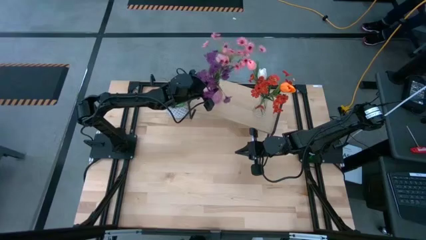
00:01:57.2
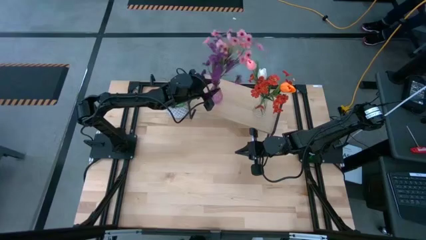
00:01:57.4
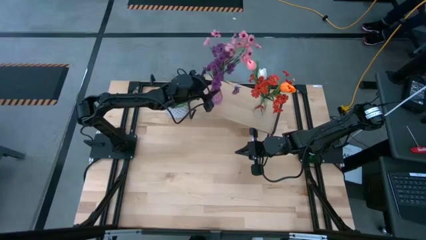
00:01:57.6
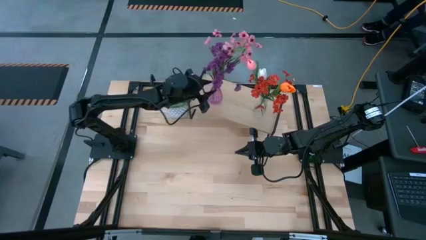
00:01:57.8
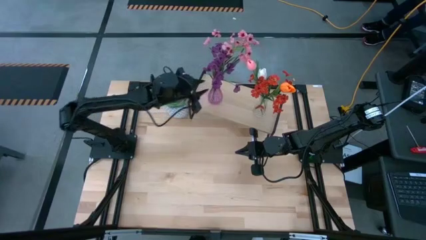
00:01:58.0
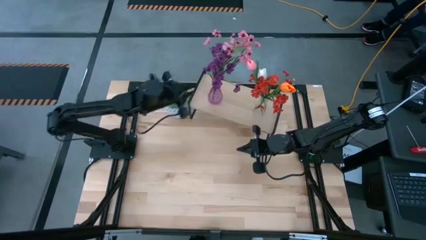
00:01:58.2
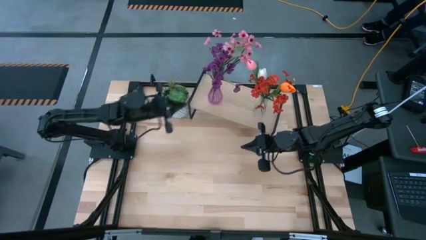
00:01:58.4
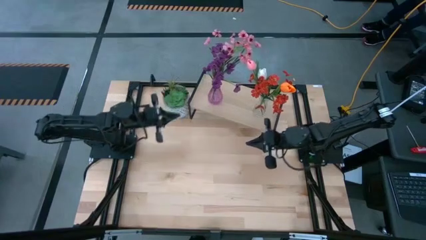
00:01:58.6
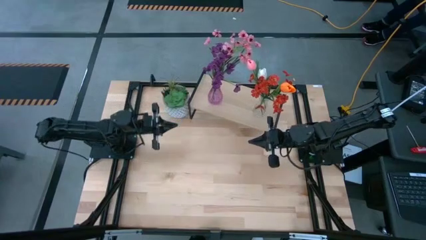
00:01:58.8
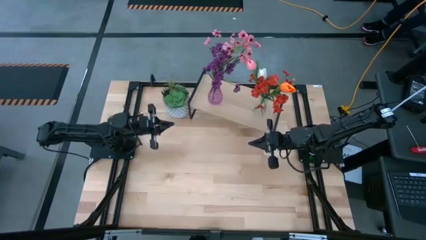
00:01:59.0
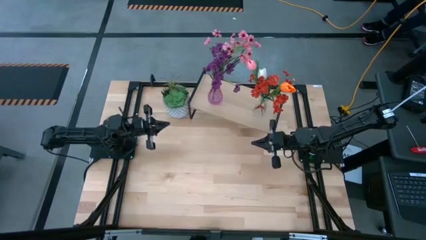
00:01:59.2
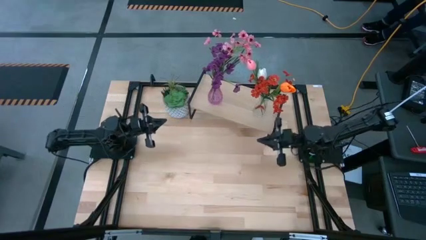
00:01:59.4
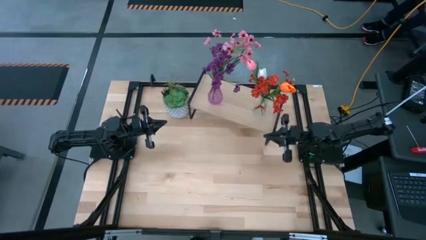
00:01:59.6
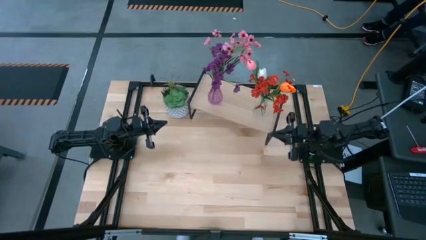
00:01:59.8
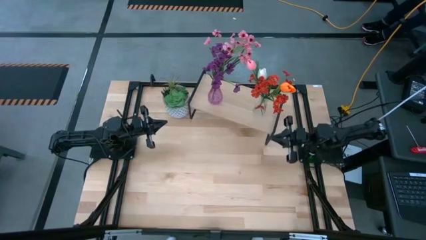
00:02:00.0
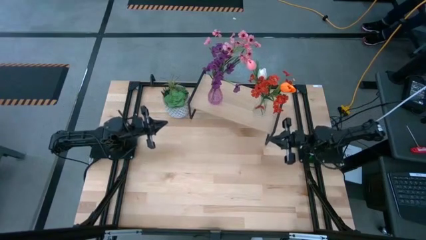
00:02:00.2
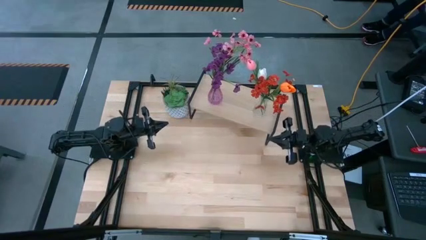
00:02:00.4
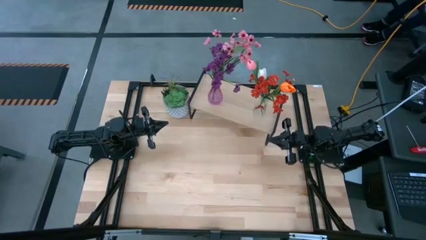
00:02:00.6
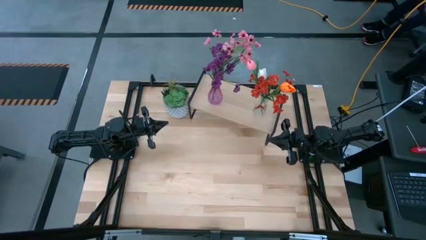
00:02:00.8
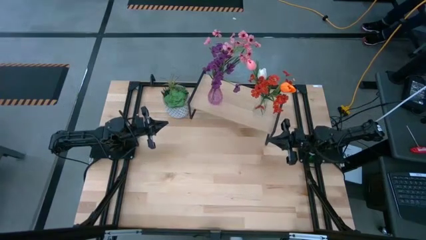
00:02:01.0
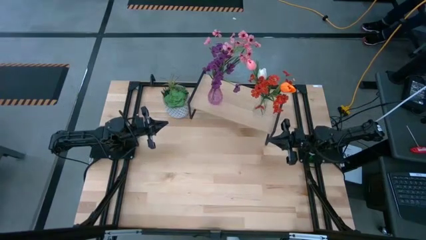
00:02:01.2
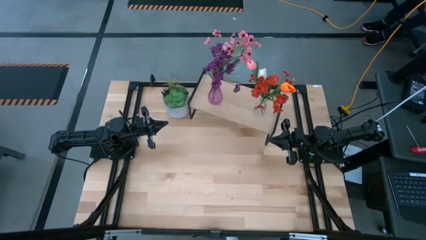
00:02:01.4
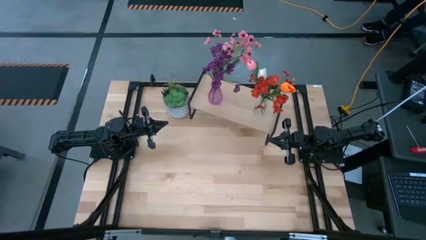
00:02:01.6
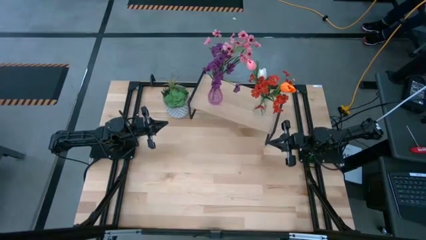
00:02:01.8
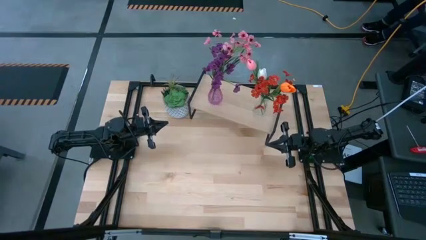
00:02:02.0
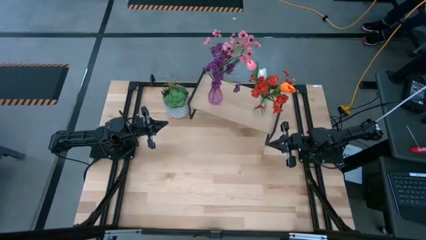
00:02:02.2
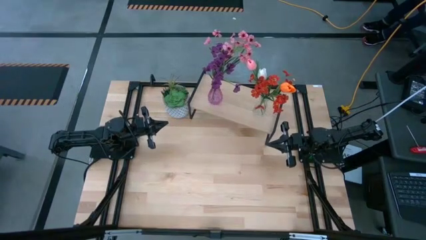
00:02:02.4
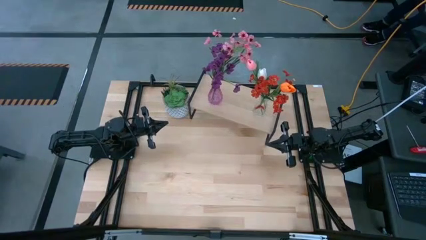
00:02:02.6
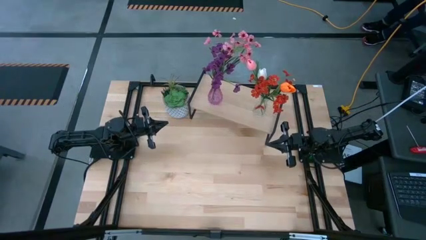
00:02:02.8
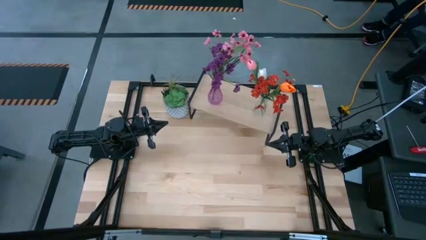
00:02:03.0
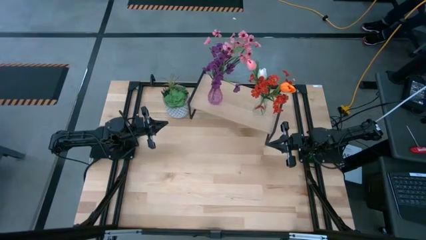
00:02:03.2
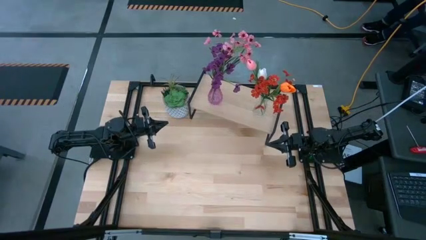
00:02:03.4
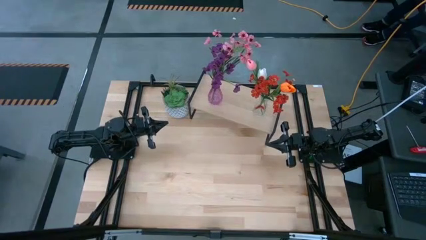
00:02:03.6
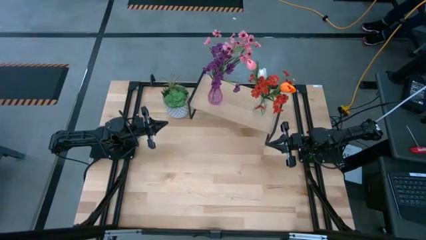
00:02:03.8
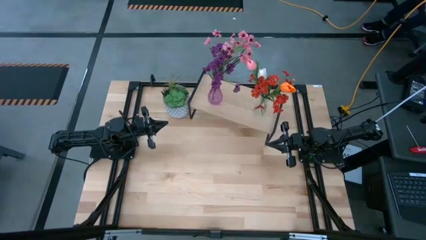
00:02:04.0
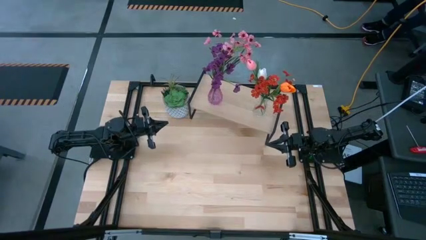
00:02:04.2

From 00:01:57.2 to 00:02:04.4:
Task: Pick and place flowers into a vace then onto a shelf
Return to Home Position

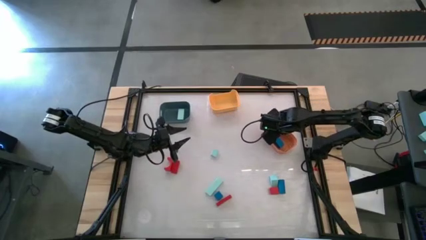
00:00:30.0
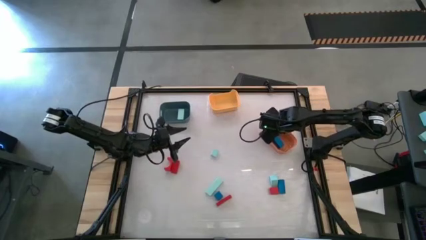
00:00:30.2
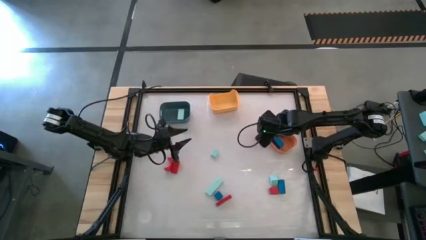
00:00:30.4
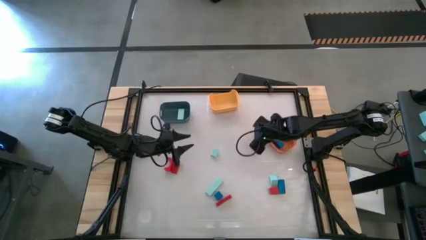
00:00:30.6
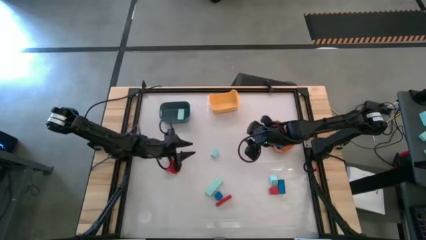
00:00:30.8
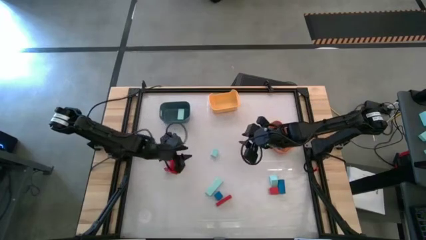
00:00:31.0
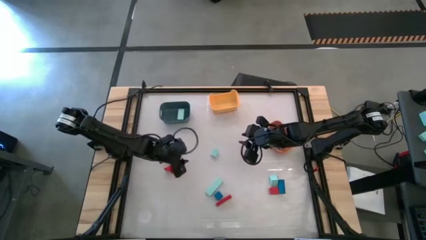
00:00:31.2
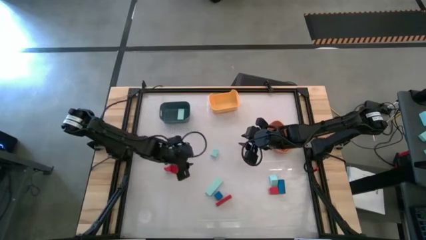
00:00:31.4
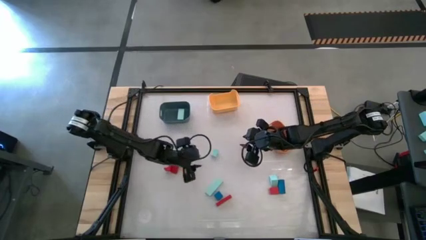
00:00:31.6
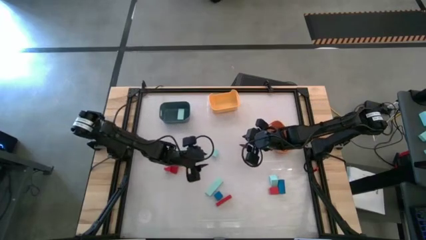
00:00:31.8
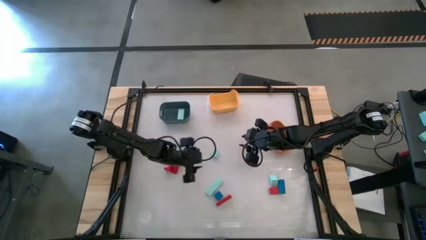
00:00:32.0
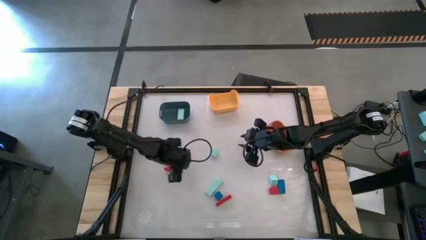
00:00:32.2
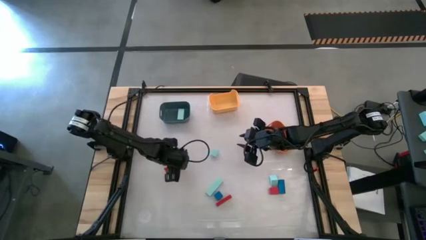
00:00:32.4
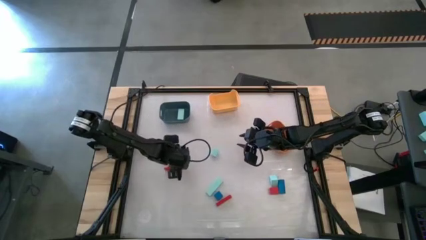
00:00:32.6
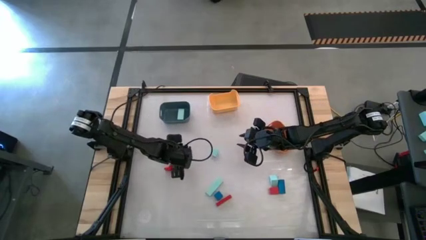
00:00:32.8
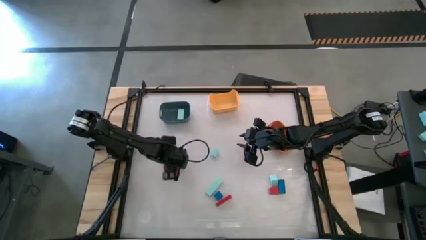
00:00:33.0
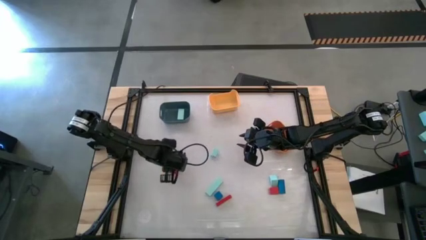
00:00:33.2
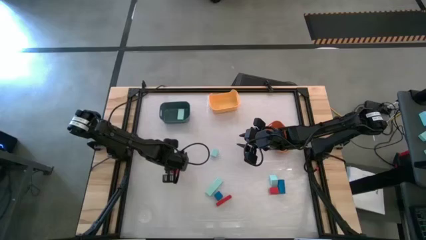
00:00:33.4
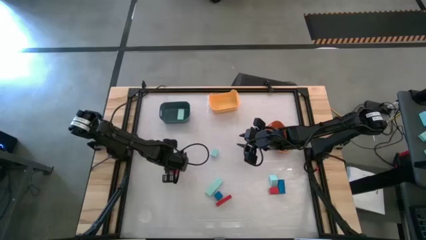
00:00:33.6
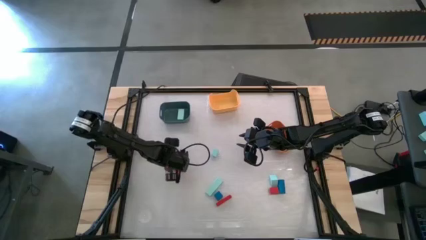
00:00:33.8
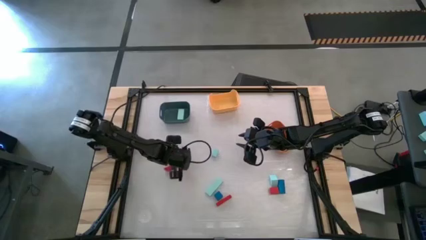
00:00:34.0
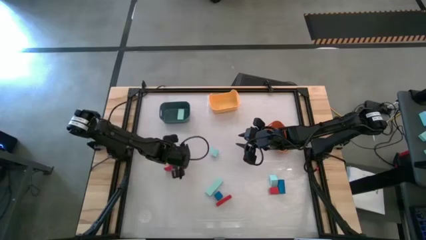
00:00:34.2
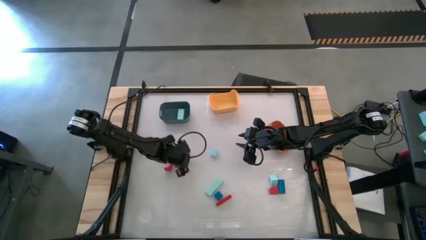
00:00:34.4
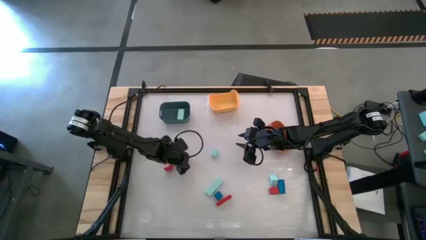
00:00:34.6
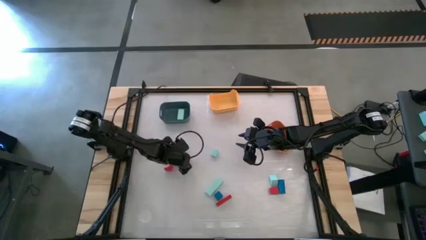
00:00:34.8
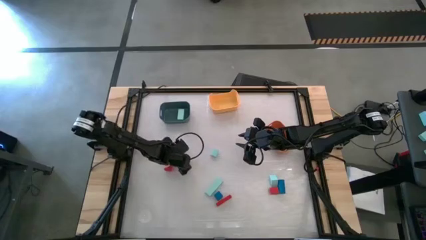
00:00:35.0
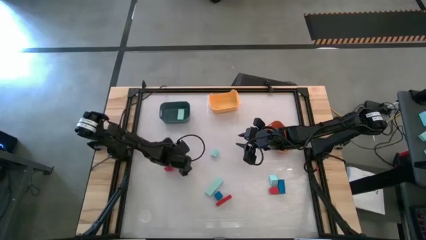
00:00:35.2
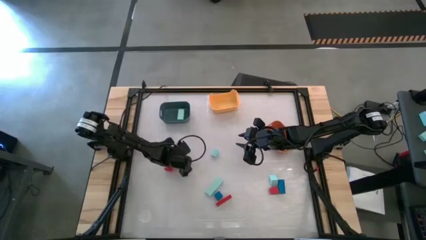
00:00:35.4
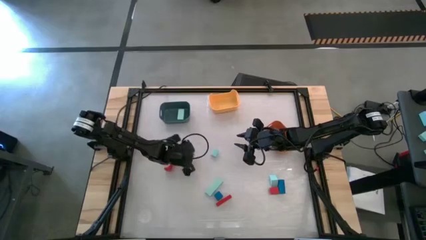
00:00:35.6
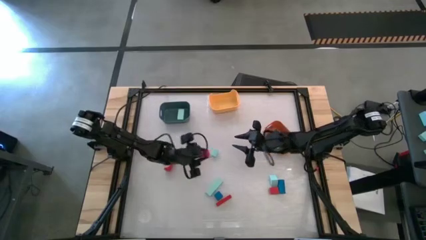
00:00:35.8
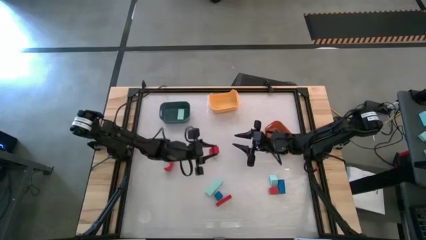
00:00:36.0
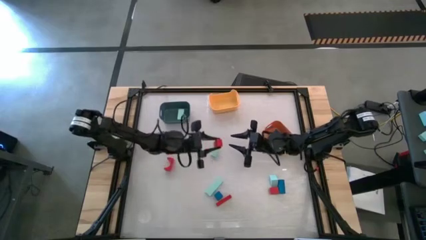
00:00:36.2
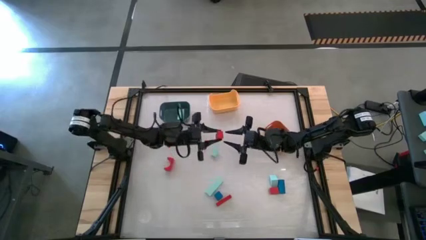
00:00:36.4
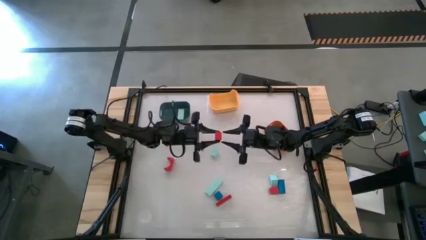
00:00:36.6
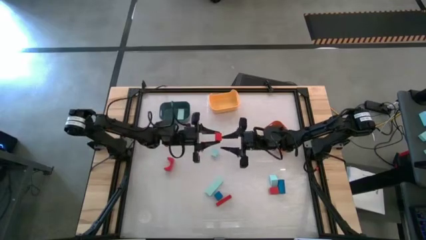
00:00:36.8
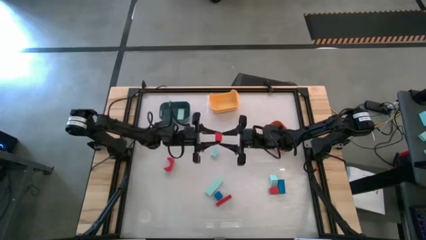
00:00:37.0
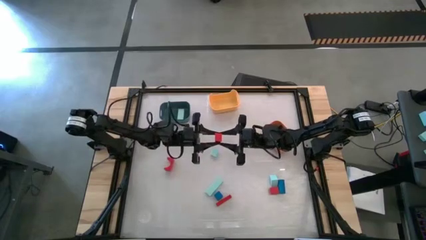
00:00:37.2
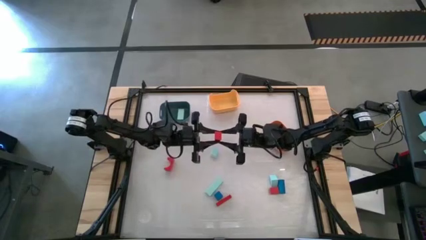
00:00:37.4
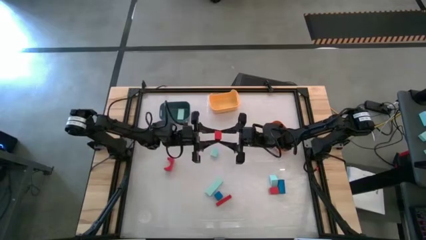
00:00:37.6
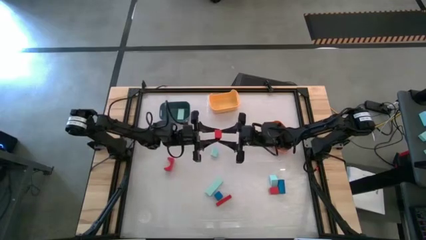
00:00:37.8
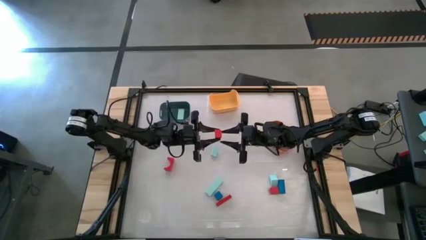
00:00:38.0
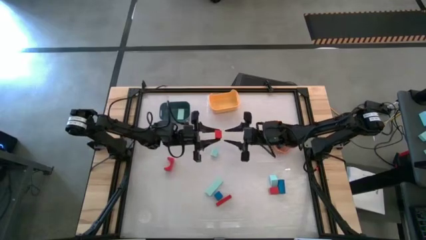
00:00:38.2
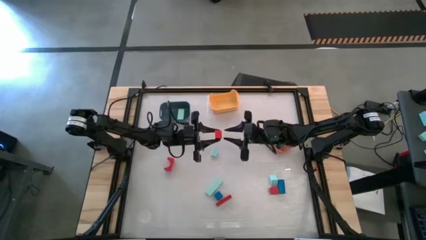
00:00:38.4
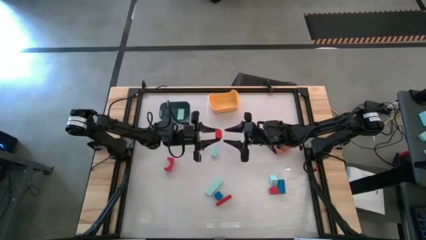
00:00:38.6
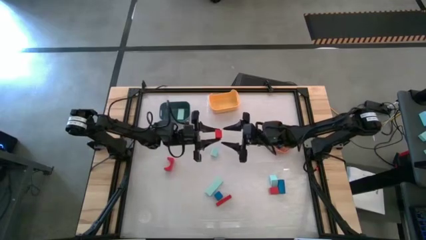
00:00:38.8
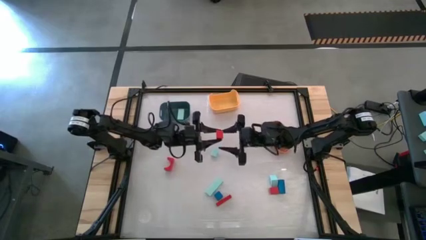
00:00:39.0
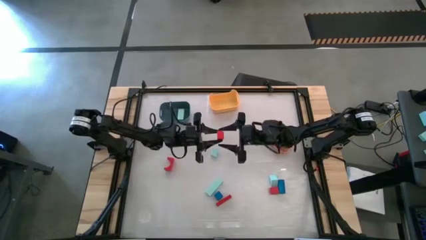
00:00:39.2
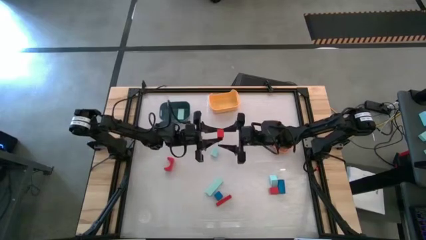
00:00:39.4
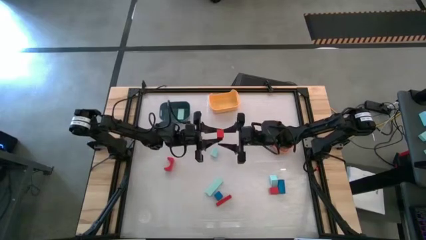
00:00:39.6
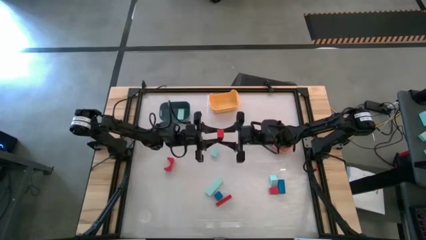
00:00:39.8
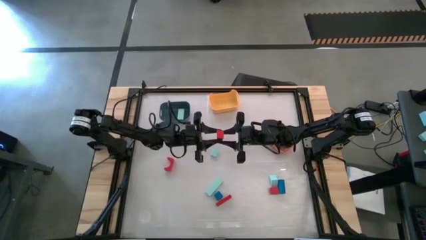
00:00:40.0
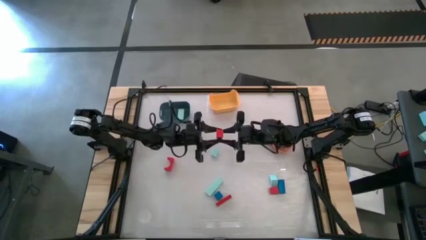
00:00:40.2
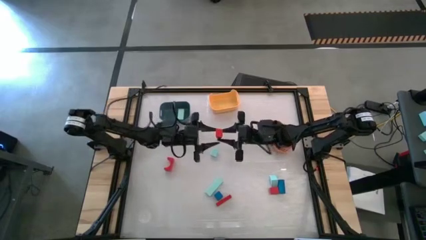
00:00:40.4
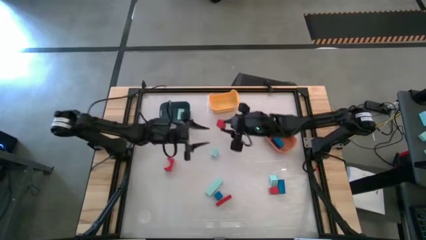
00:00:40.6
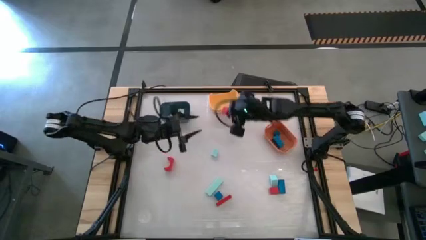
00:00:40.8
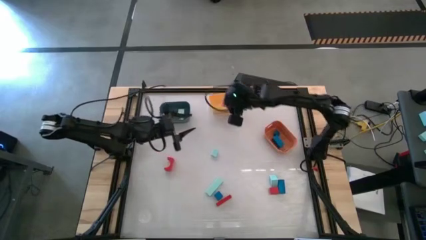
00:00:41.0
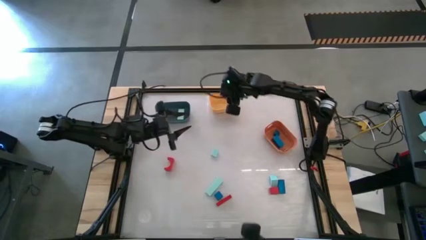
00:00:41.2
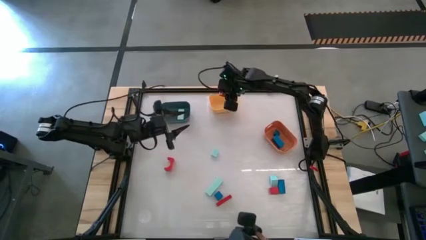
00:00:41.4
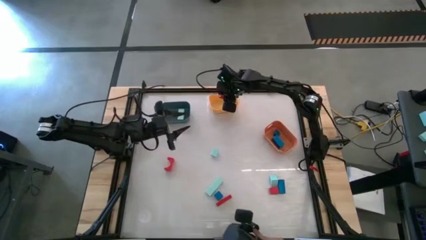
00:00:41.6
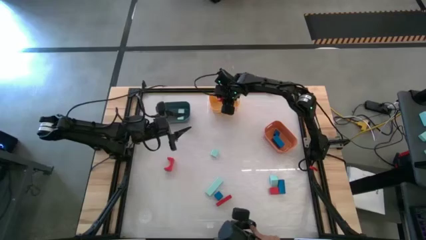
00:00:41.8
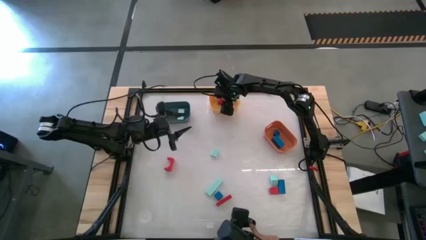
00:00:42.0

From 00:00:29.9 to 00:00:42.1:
Task: Sort & place blocks by color
Put the orange block into the yellow bin
